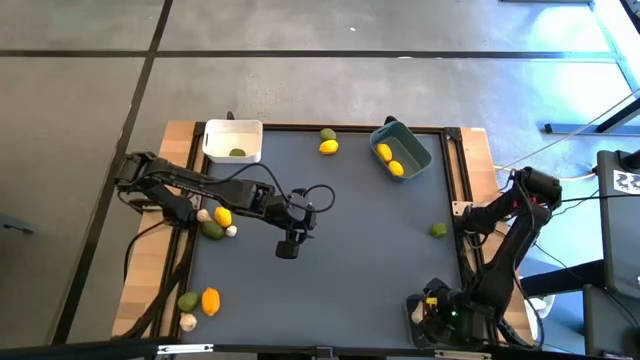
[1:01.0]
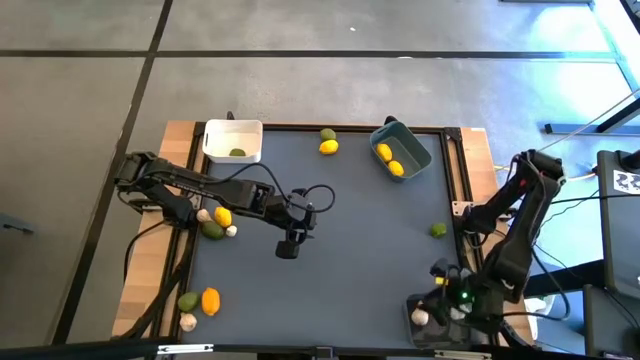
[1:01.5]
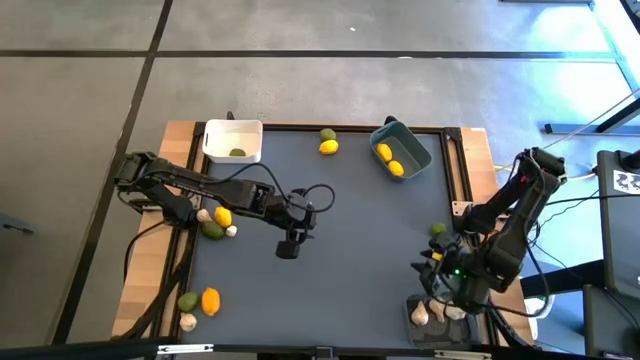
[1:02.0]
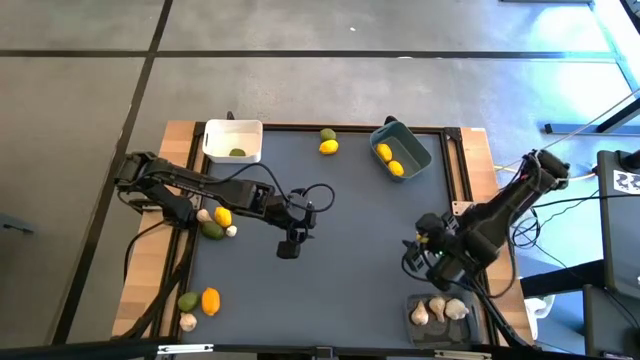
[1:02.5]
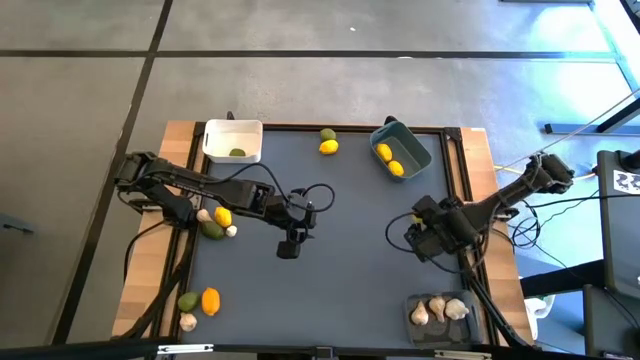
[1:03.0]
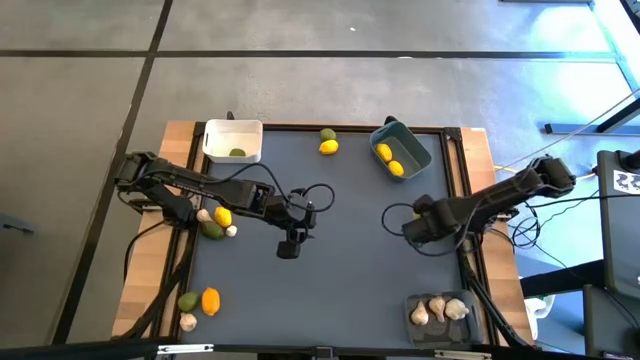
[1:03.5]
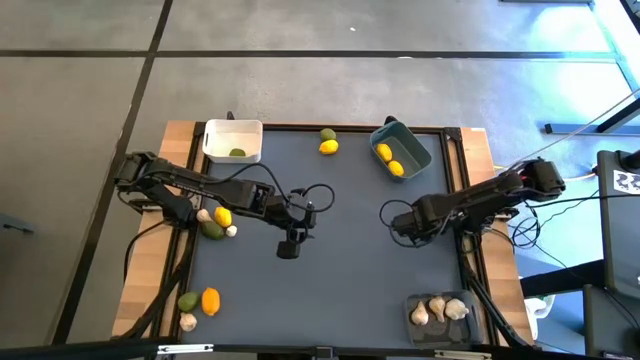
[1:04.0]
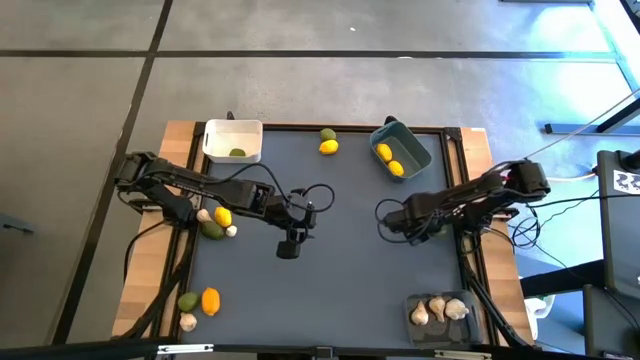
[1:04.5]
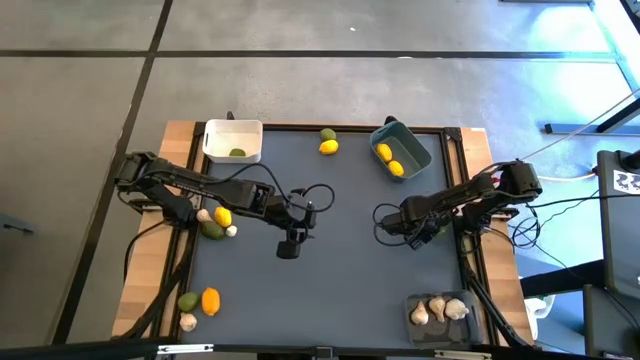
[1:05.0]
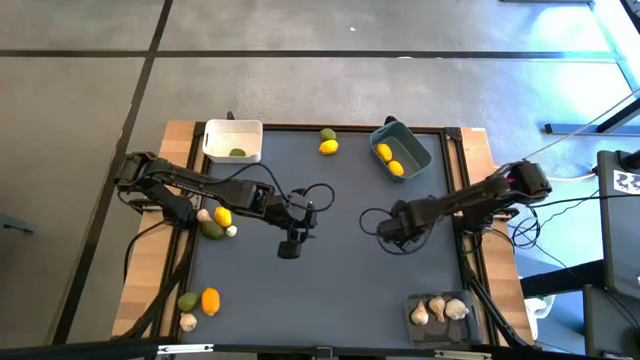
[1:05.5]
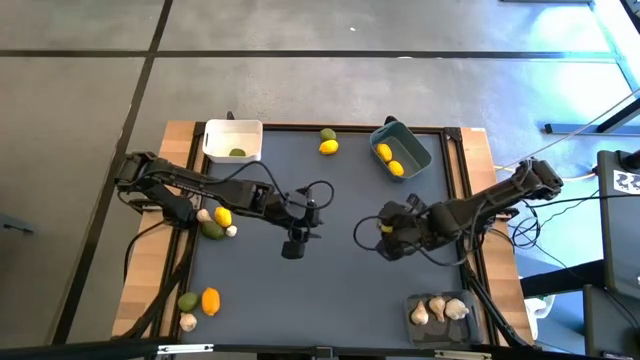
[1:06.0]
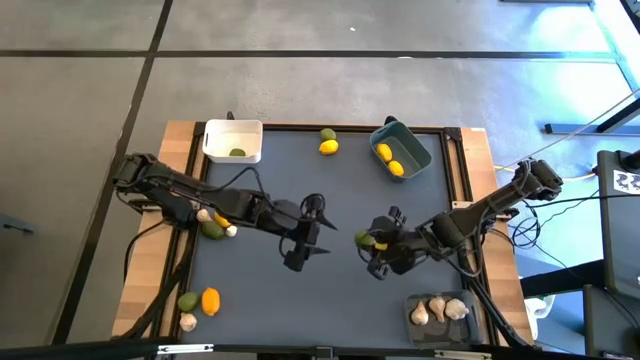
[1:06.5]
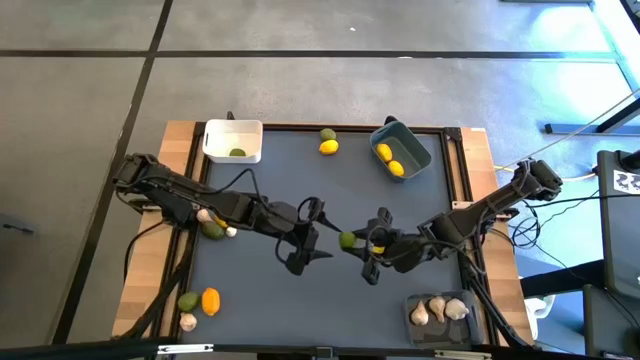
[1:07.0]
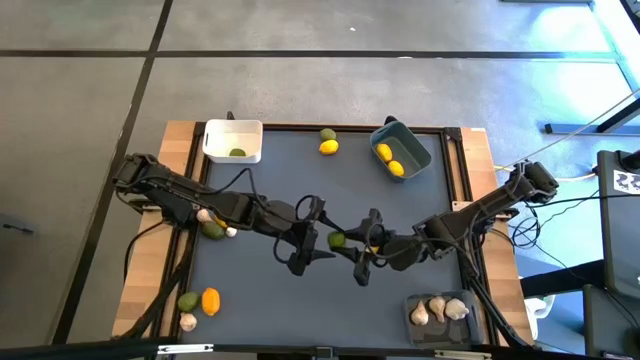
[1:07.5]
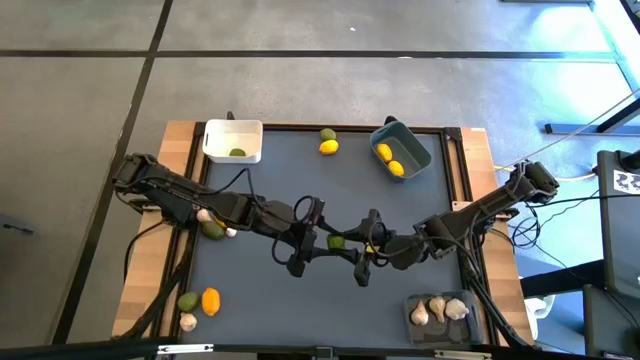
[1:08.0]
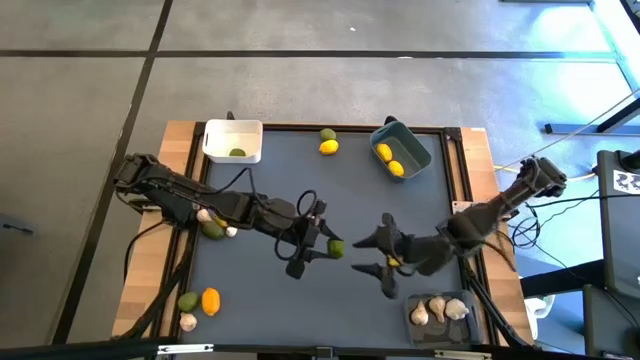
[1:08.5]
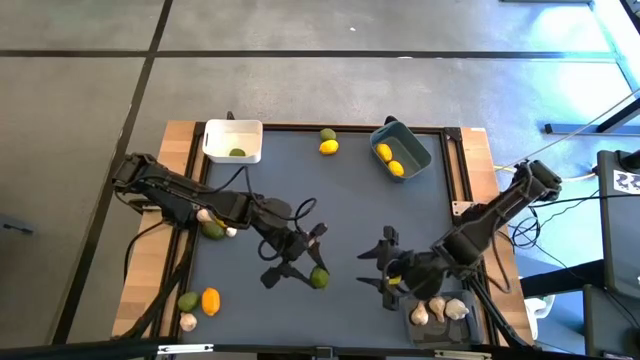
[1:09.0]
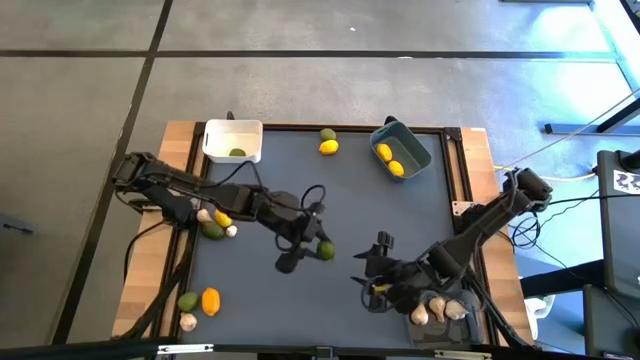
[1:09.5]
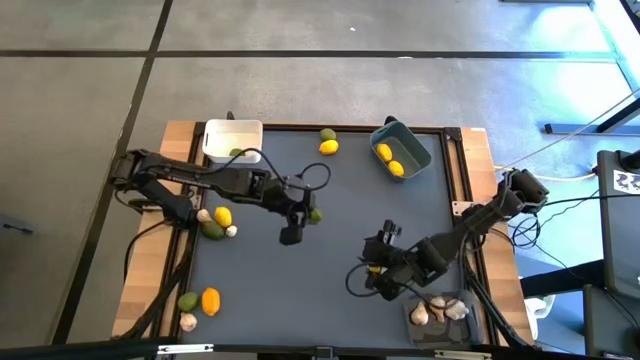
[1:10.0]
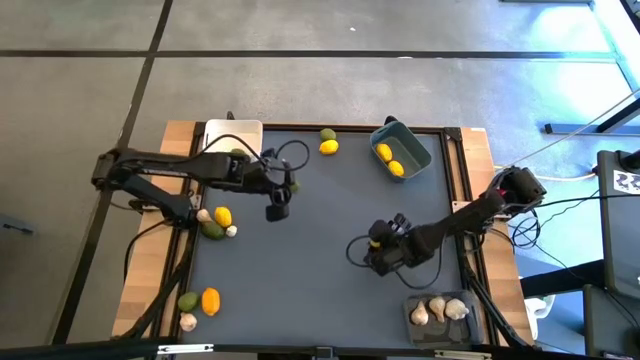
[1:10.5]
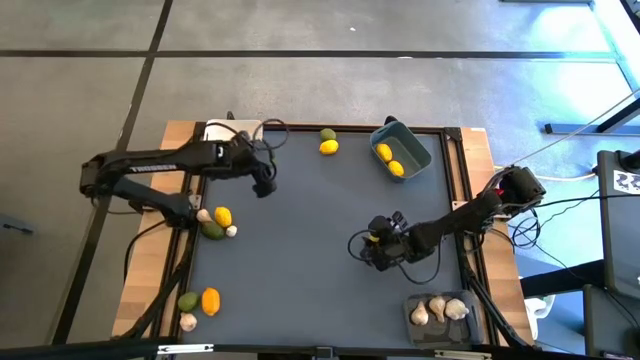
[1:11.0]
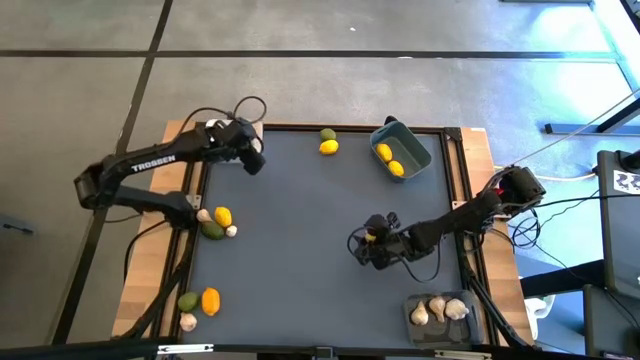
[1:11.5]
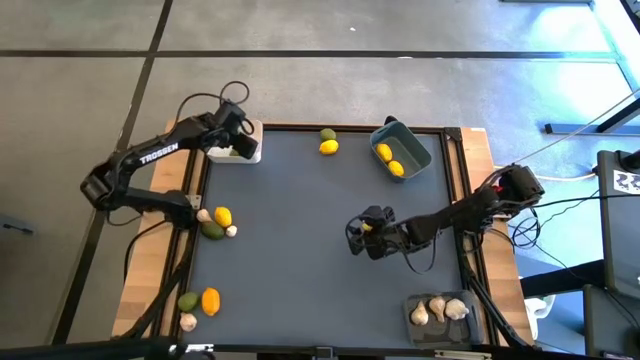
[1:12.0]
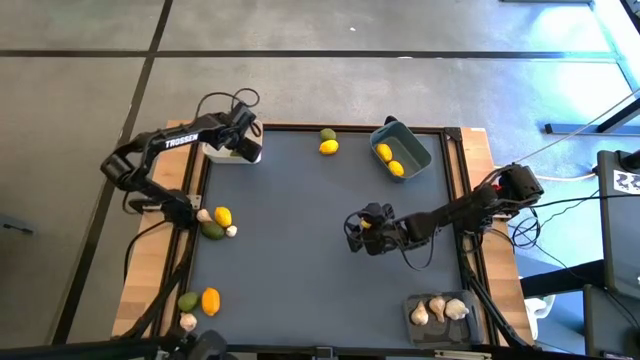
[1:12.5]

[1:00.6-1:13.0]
Task: Sort produce into baskets
Put the lime into the white bin

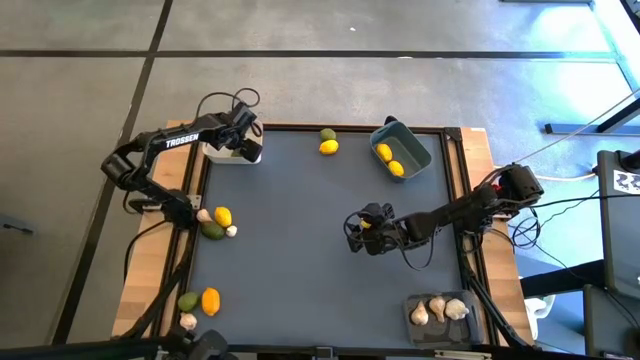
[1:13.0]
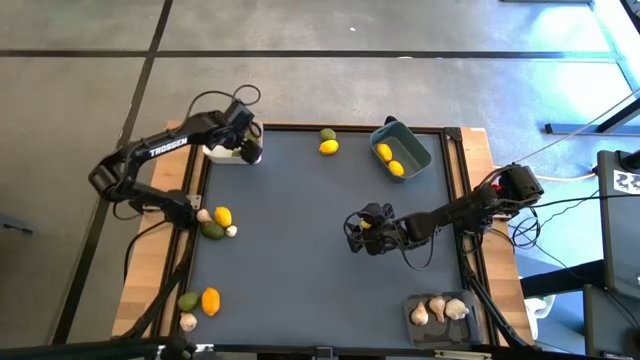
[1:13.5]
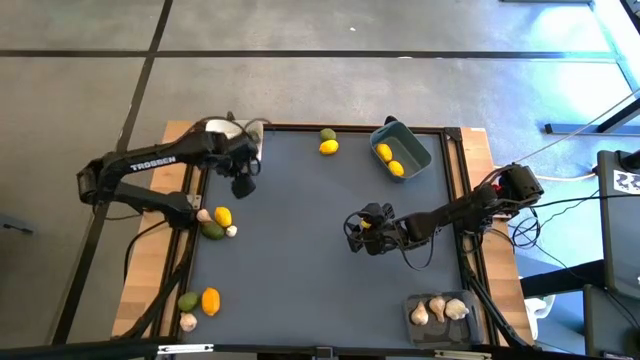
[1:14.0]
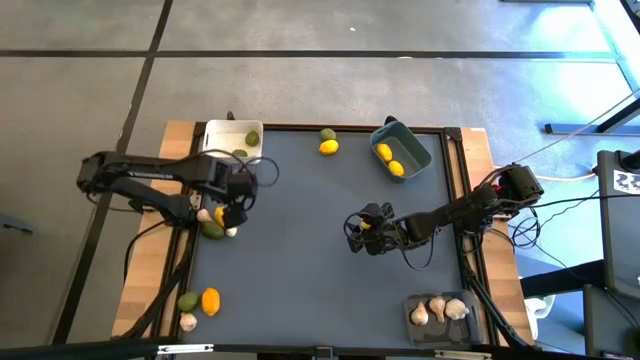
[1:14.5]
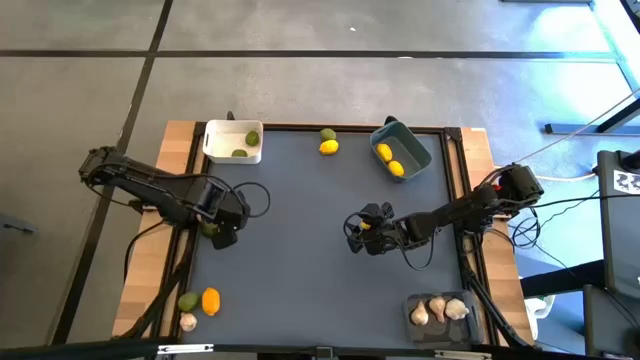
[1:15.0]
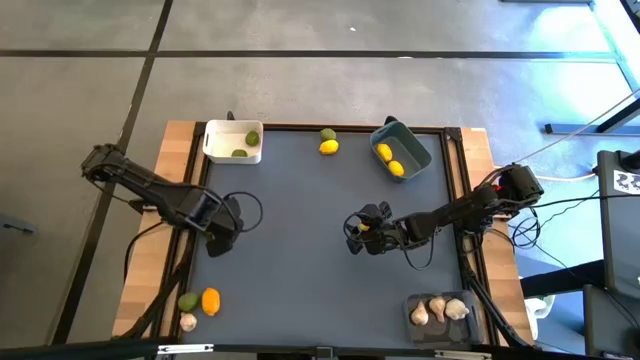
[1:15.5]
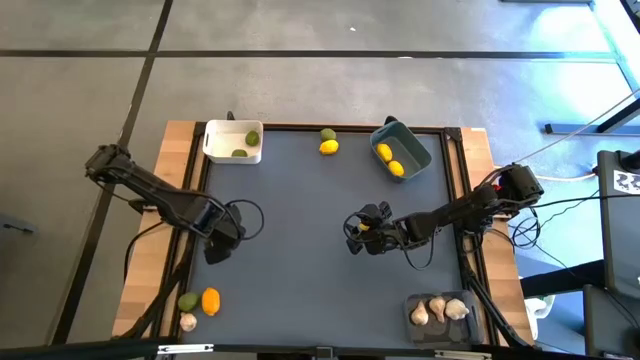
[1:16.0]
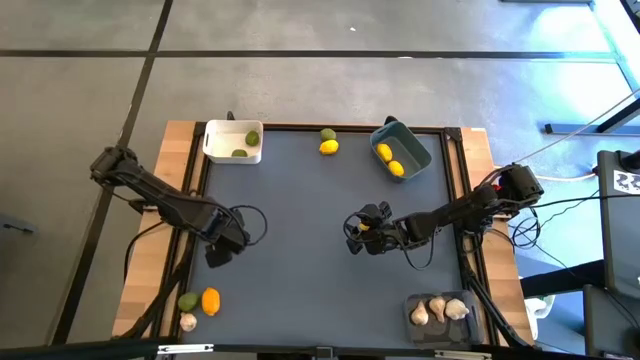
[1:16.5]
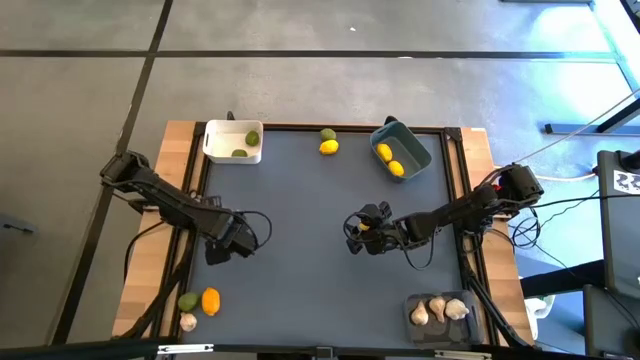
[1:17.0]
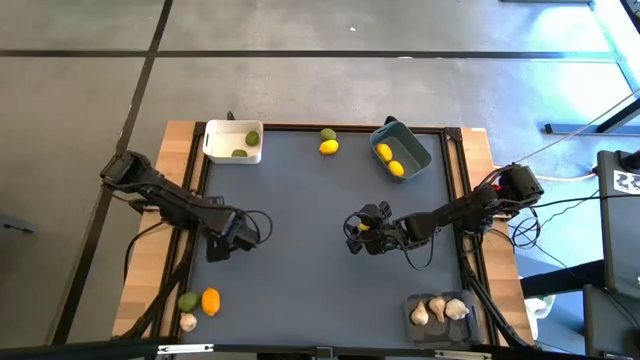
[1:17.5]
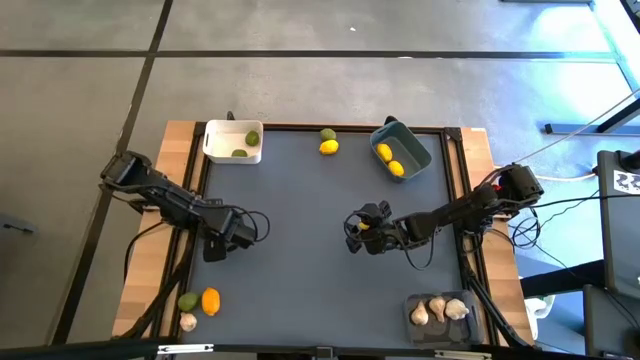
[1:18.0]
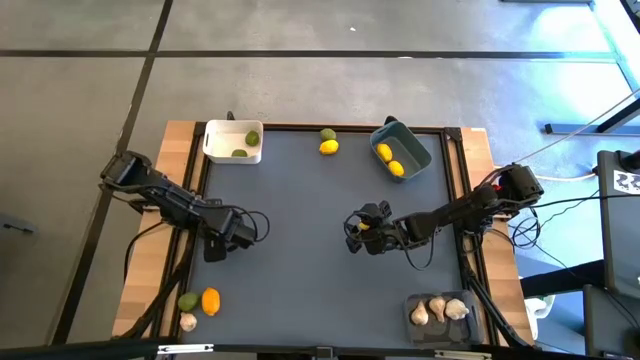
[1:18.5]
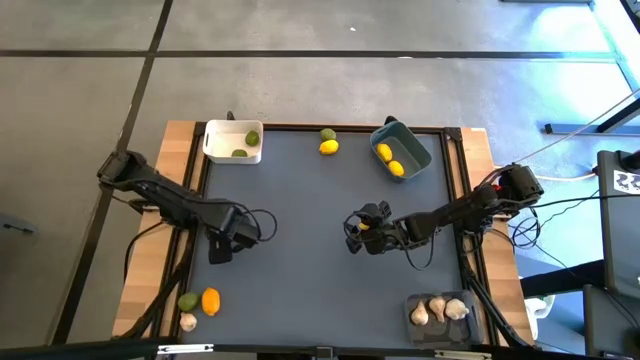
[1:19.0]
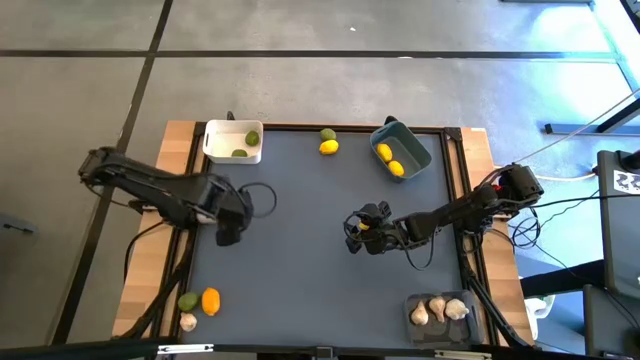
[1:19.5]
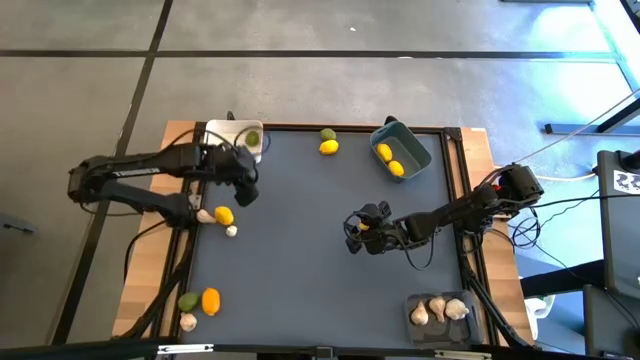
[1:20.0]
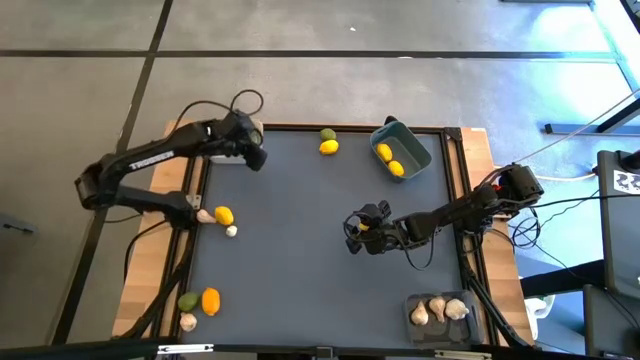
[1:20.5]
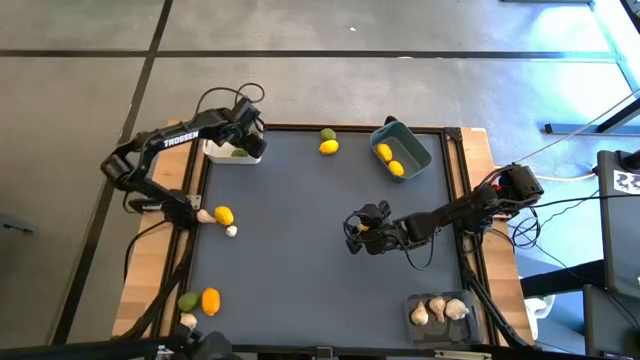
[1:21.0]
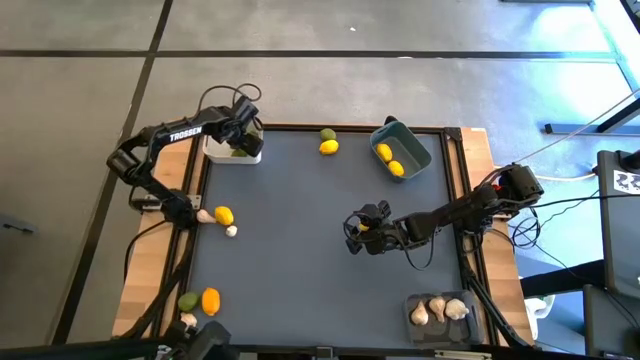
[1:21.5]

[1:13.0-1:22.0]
Put the lime into the white bin
